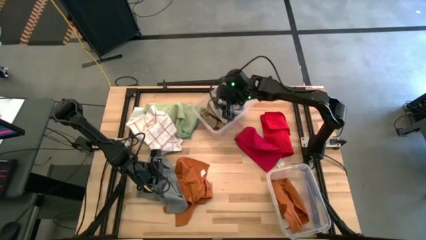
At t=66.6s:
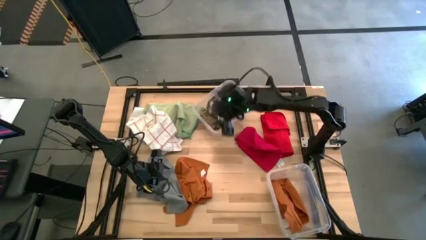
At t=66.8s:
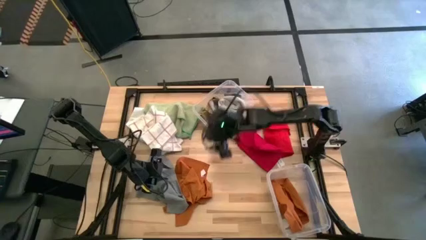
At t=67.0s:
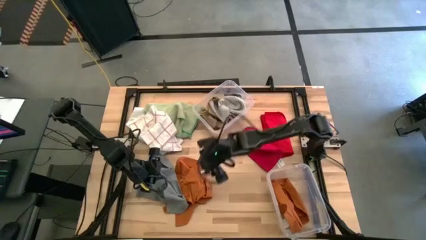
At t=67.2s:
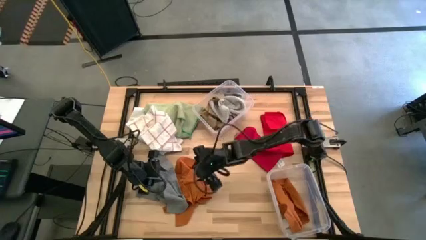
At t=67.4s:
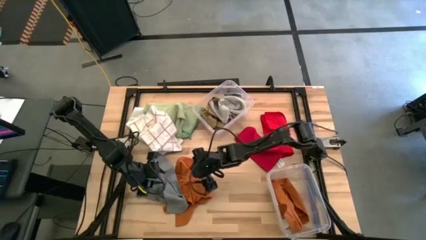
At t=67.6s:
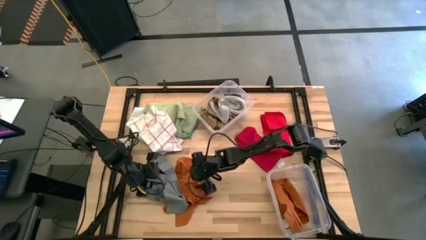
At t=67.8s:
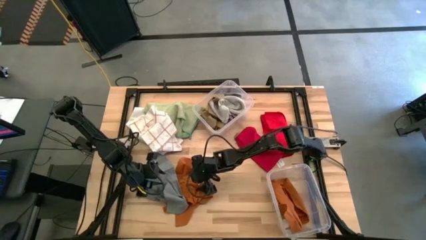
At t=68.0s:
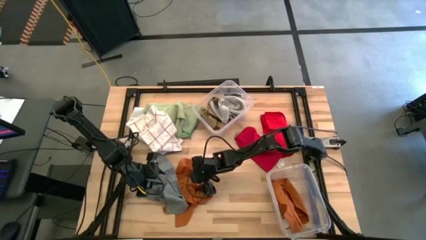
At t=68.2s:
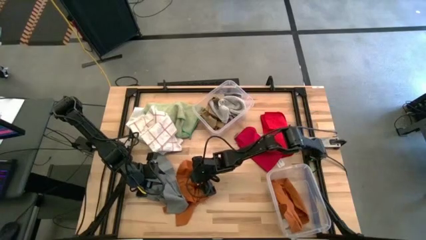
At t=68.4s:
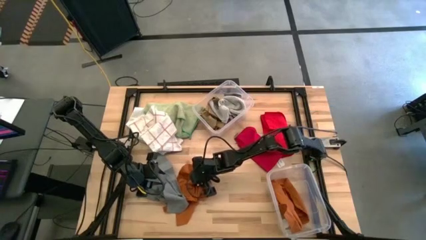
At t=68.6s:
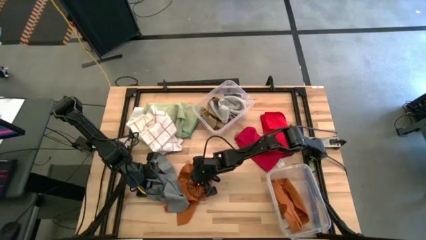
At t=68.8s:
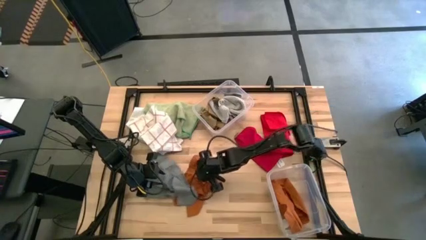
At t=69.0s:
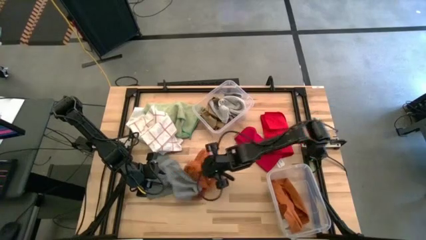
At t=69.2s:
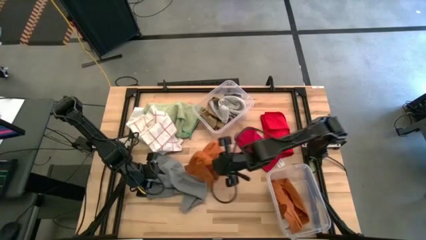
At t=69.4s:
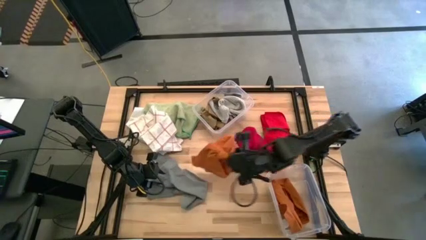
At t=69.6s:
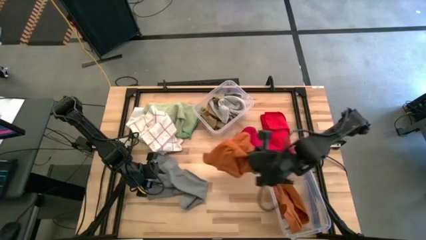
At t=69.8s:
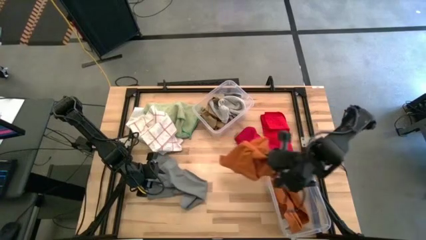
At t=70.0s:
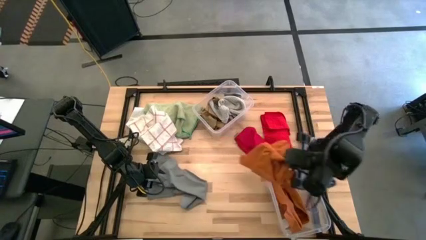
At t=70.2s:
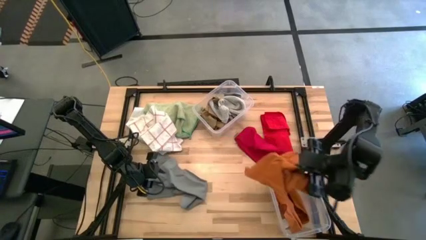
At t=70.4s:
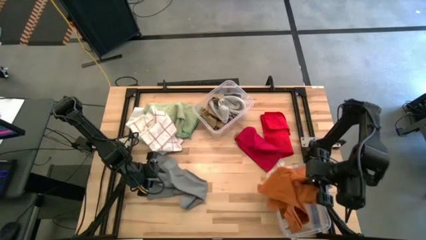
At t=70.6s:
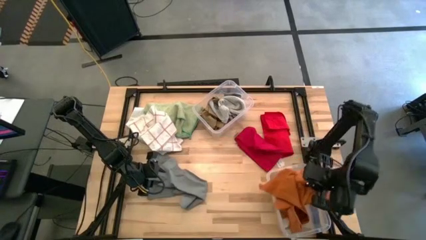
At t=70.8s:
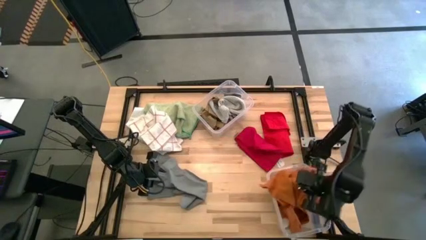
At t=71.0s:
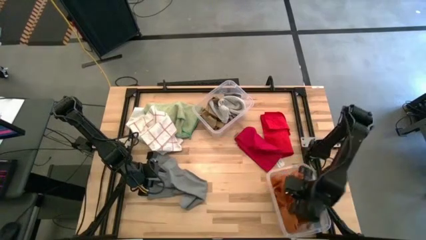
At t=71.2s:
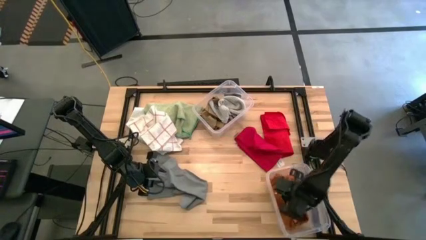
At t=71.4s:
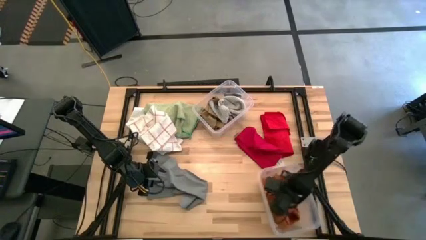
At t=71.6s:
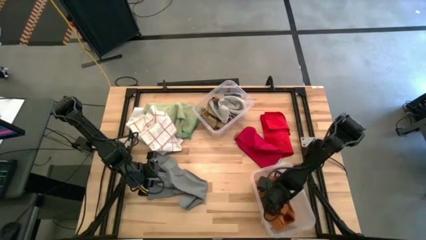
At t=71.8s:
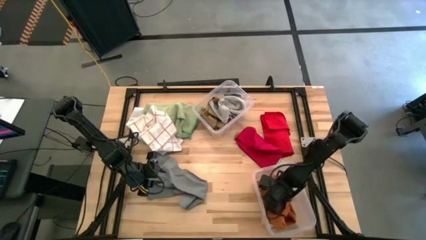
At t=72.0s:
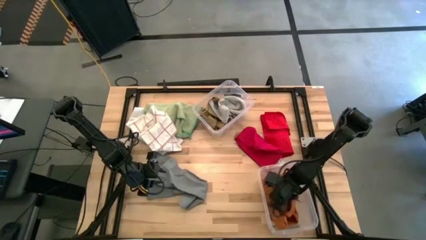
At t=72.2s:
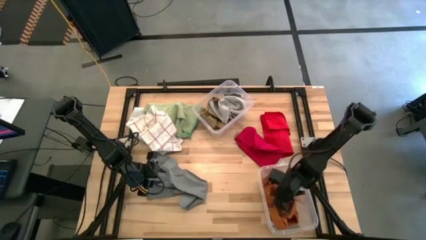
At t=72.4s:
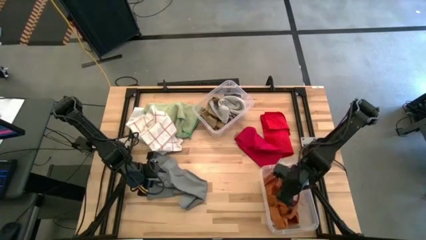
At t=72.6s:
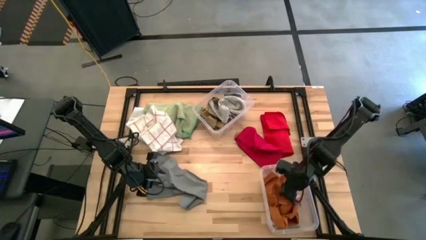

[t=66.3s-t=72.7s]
Task: Sort towels by color in basket
Put the brown towel into the bottom transparent bin

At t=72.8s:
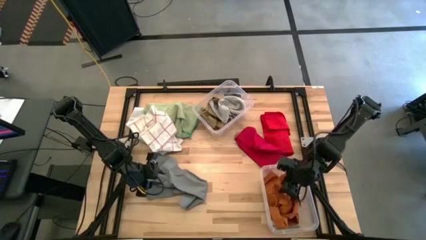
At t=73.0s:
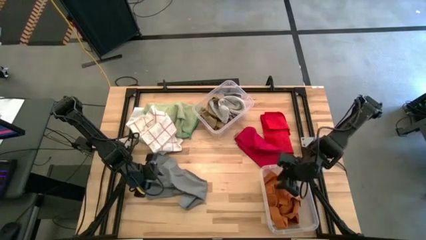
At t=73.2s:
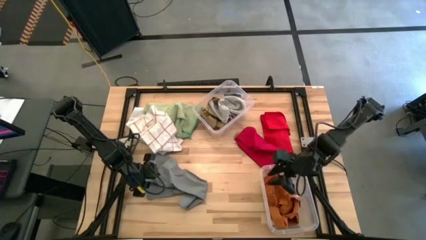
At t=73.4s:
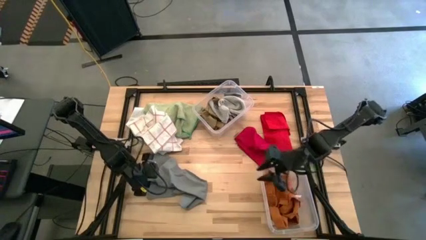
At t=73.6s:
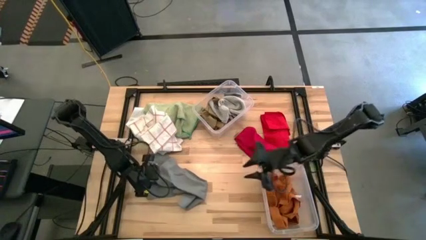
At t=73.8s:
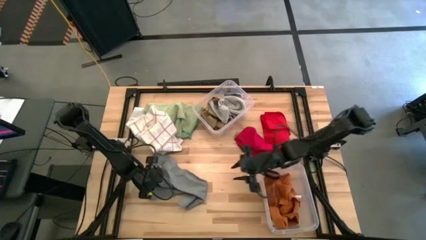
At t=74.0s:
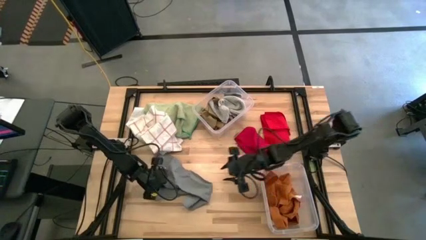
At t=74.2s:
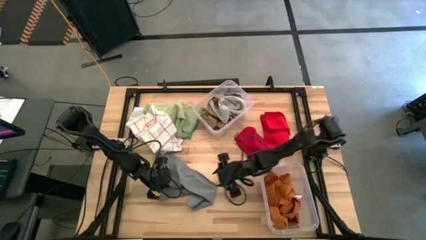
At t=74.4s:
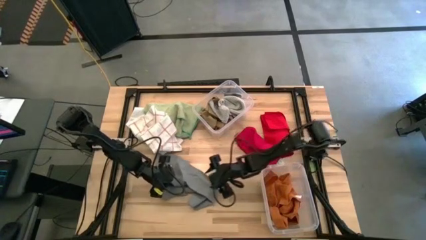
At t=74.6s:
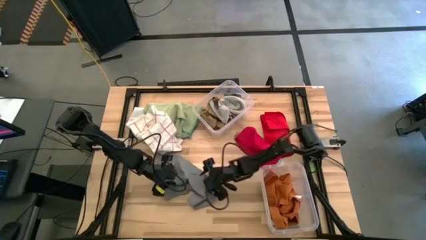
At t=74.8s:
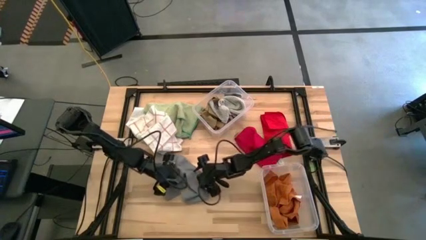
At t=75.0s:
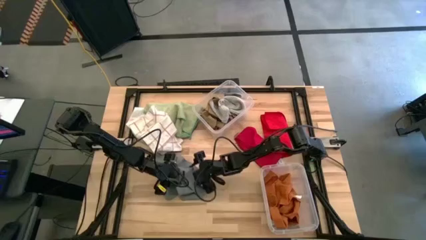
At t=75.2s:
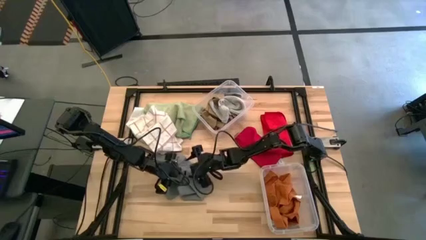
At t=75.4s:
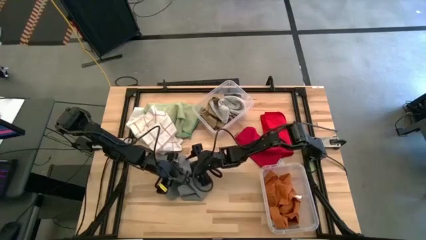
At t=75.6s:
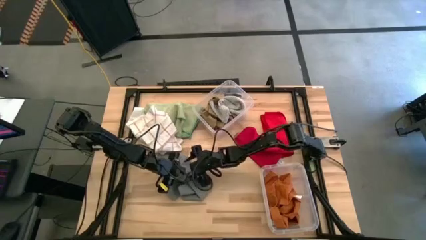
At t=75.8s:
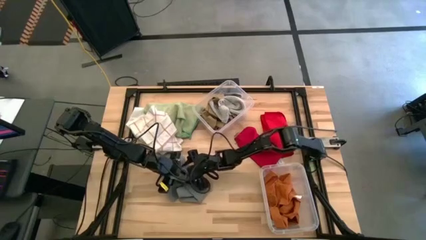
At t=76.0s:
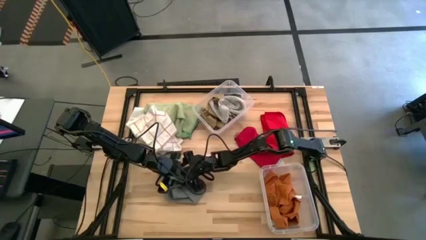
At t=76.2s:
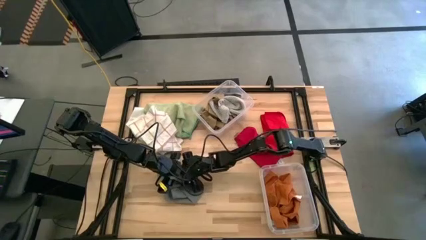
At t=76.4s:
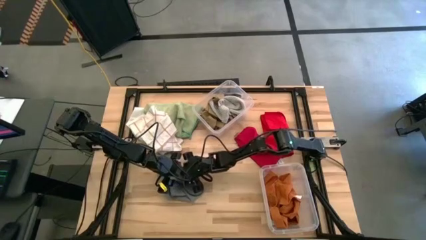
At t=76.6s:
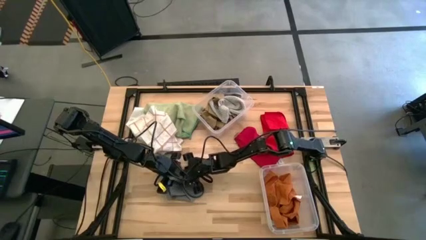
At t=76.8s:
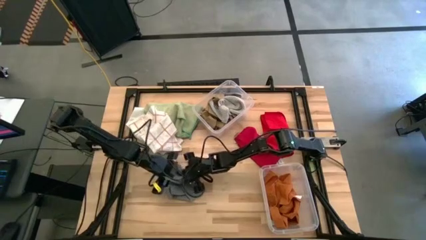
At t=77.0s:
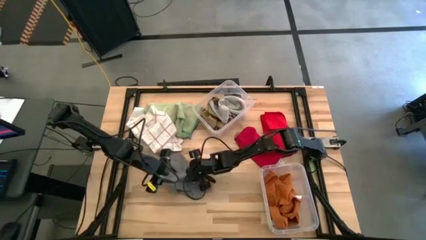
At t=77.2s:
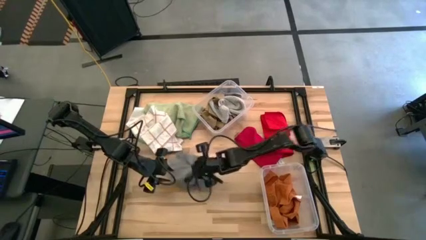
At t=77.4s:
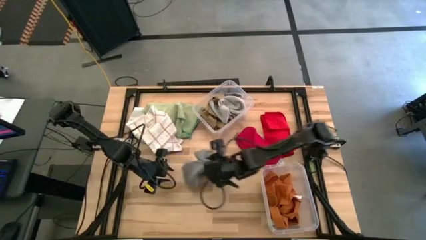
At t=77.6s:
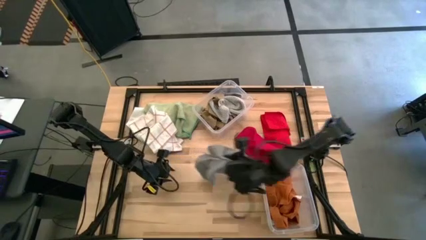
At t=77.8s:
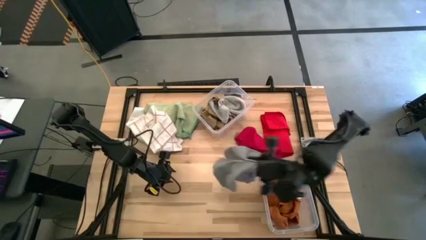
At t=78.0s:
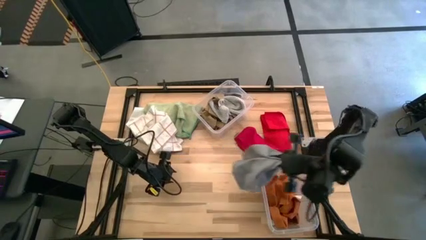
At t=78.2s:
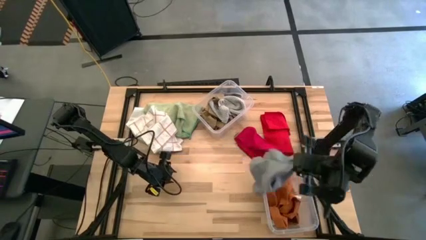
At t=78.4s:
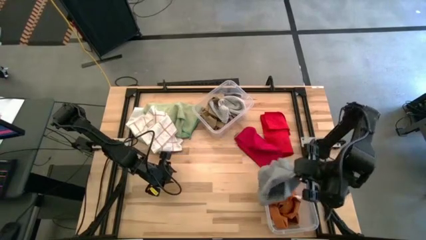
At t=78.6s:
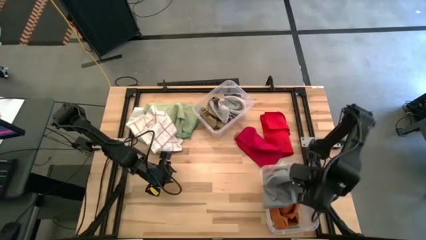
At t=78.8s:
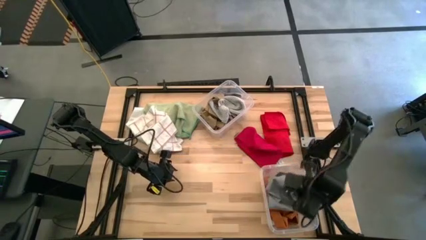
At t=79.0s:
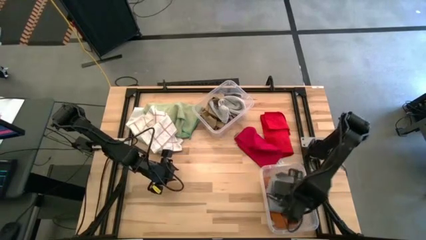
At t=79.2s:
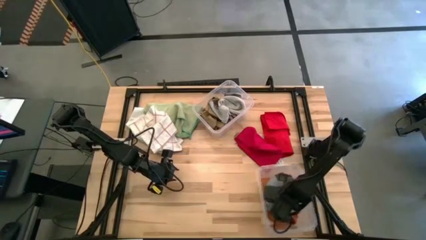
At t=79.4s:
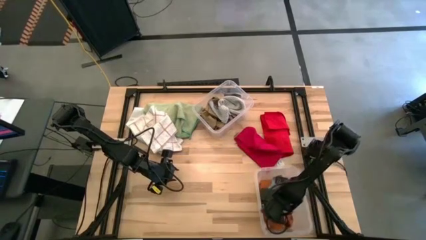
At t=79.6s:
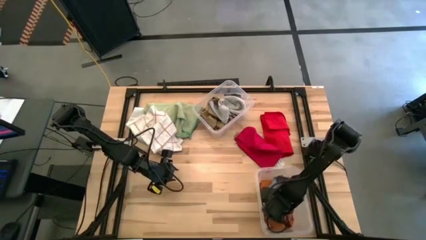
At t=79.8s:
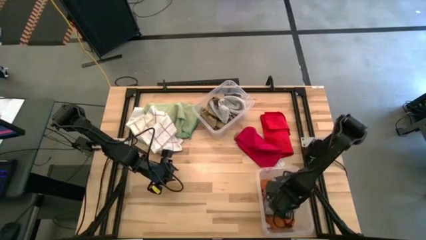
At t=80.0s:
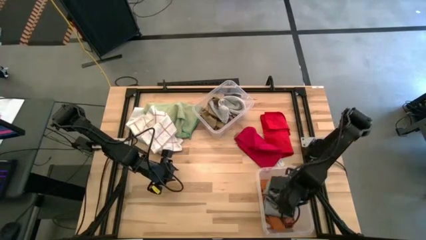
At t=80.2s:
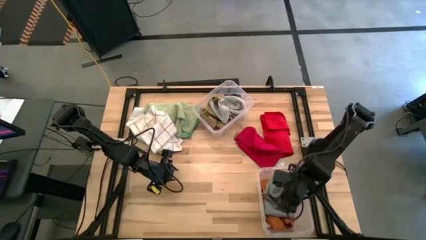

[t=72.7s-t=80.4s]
Put the gray towel into the bottom transparent bin

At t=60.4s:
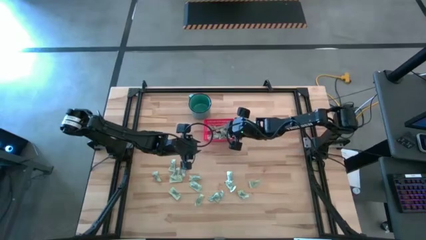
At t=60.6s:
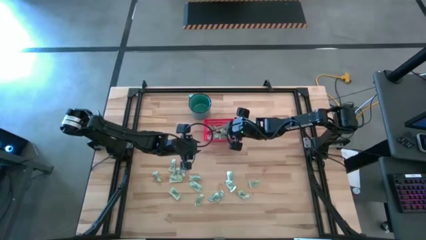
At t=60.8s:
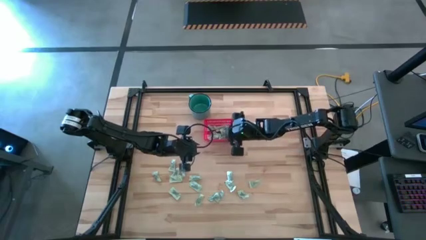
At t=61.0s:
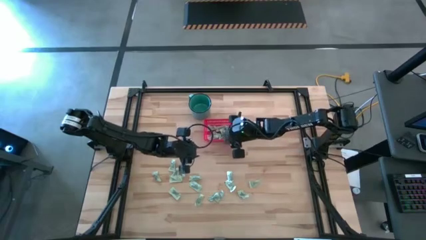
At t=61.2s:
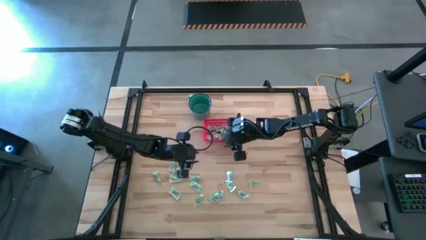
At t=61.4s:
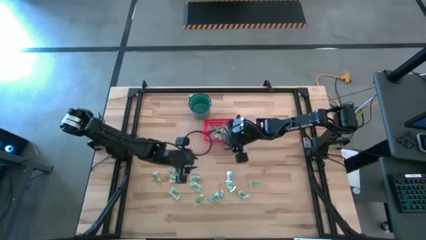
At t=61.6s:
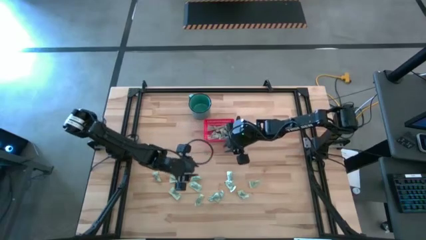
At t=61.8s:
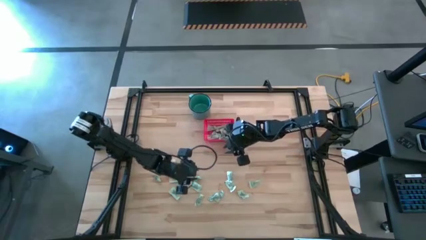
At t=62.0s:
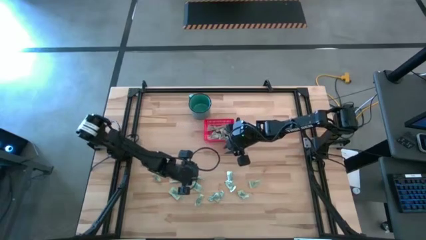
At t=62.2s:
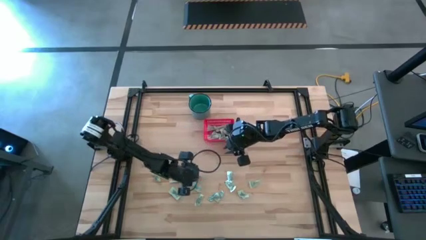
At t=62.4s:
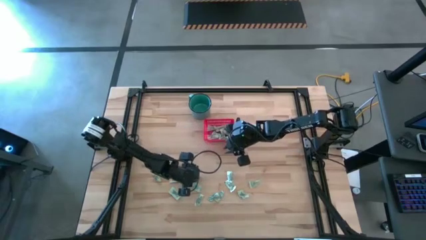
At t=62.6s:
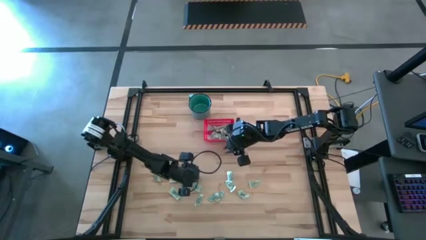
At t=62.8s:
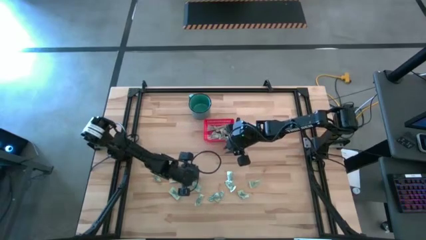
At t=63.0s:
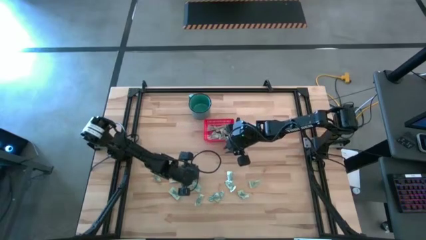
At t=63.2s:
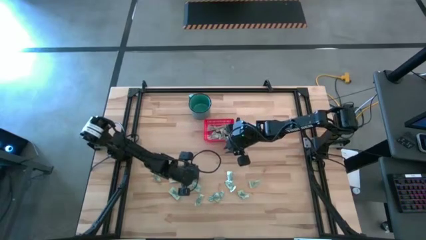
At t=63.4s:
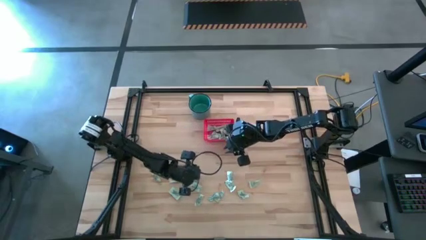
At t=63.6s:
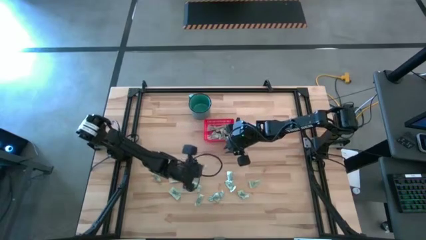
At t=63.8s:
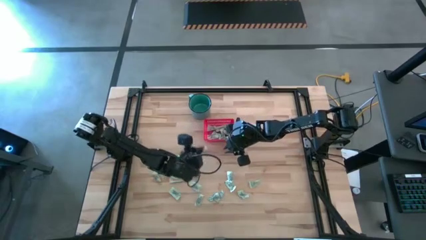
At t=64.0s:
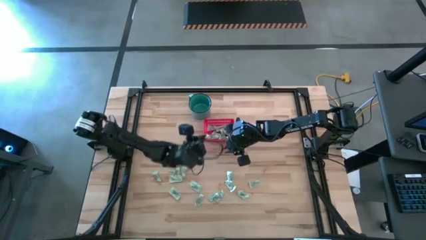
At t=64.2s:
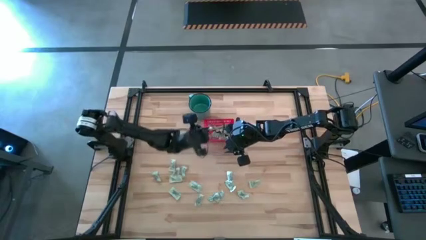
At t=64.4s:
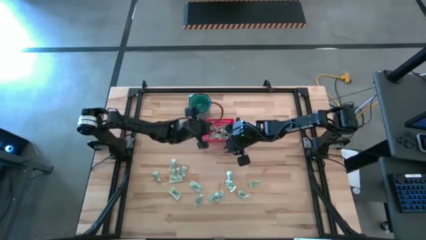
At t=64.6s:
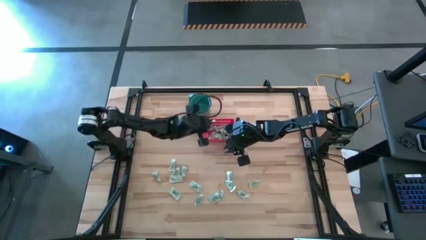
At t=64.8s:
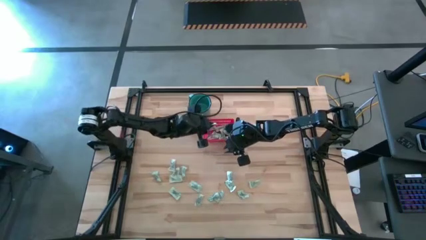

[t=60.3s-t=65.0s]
Task: Pick and place items into bin
Put the light green stevia packet into the red bin
